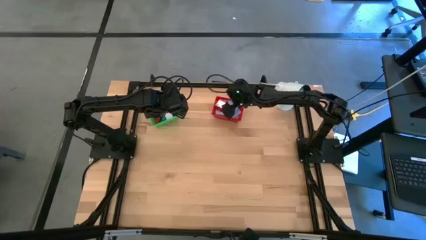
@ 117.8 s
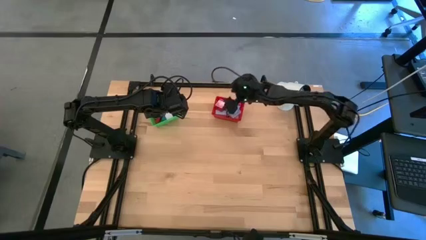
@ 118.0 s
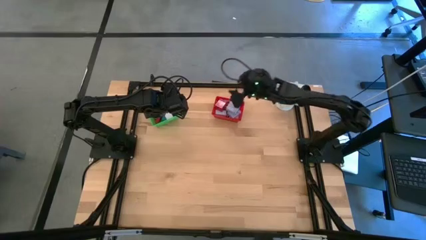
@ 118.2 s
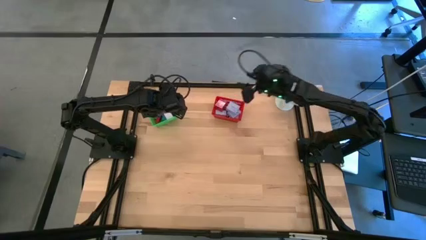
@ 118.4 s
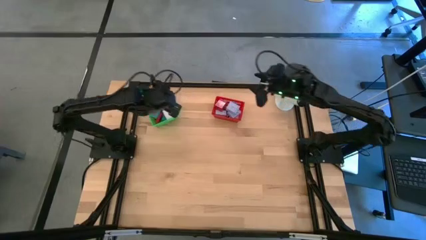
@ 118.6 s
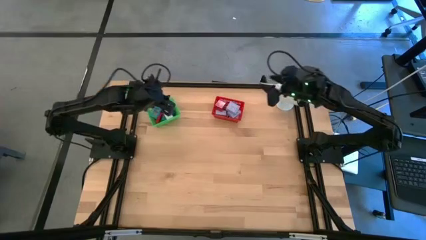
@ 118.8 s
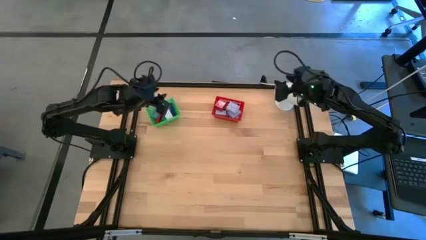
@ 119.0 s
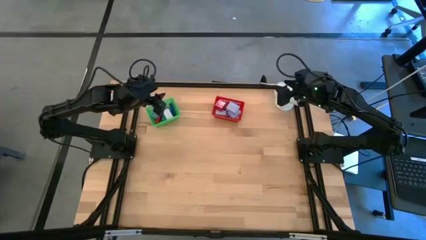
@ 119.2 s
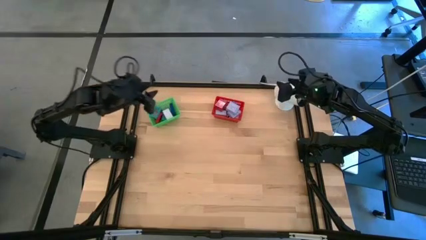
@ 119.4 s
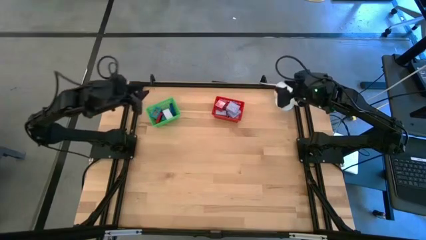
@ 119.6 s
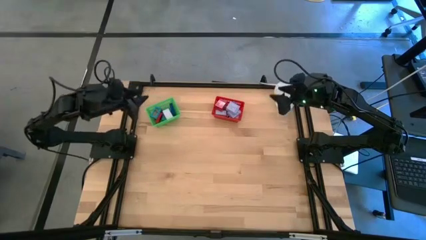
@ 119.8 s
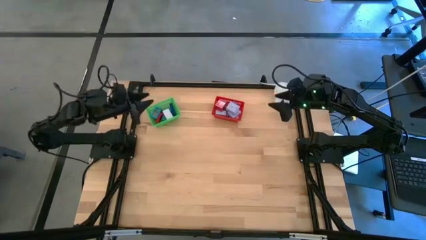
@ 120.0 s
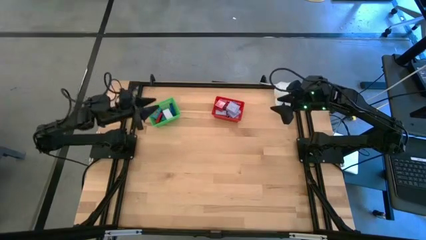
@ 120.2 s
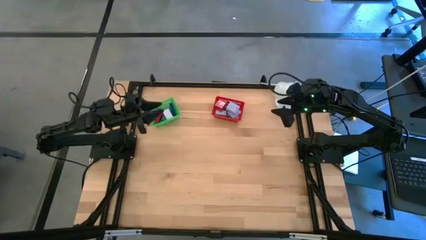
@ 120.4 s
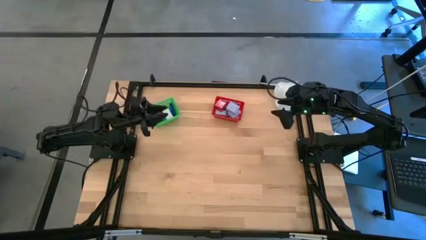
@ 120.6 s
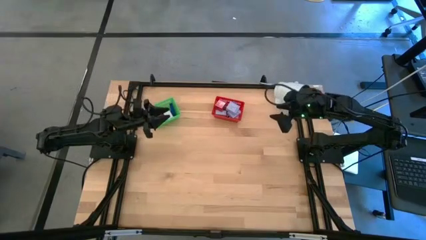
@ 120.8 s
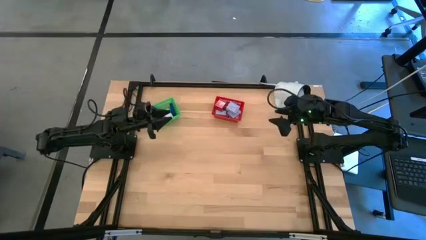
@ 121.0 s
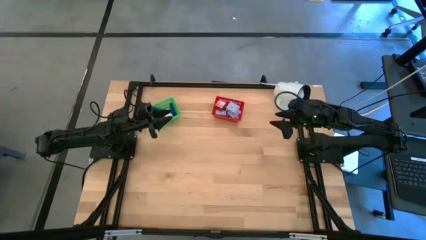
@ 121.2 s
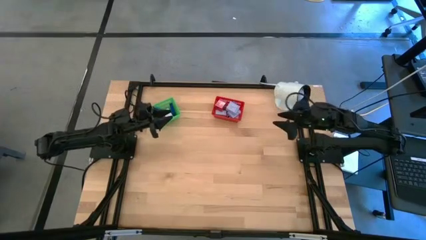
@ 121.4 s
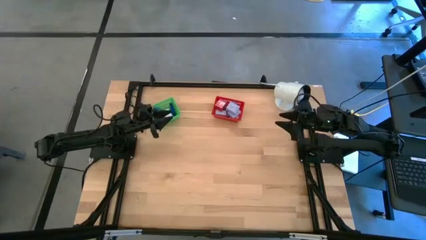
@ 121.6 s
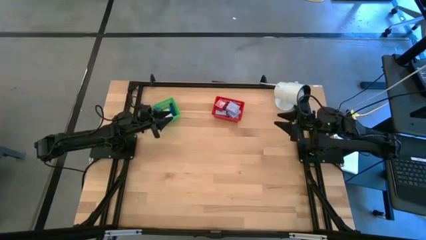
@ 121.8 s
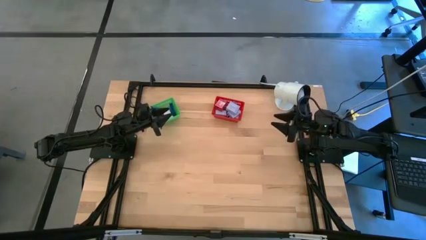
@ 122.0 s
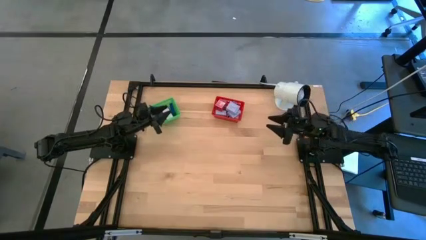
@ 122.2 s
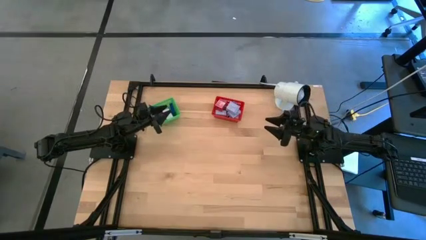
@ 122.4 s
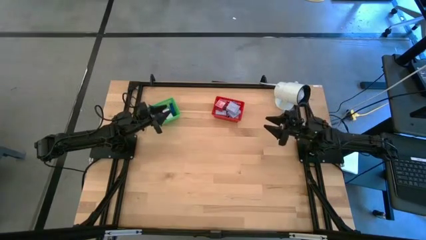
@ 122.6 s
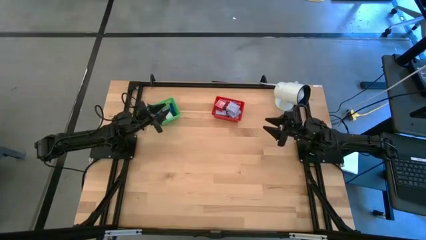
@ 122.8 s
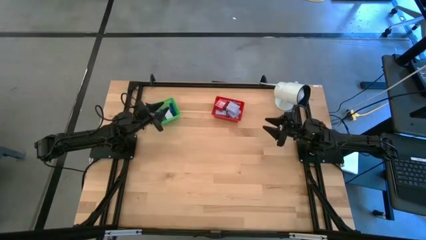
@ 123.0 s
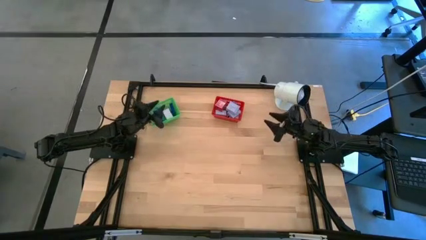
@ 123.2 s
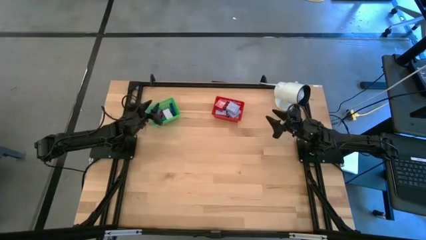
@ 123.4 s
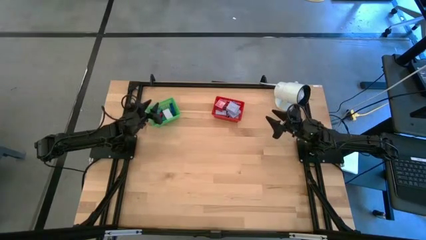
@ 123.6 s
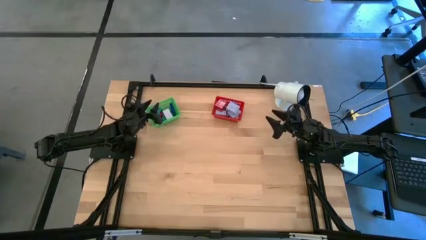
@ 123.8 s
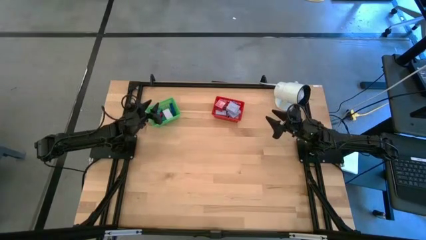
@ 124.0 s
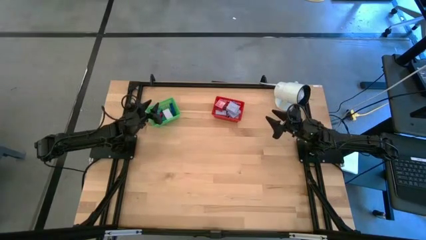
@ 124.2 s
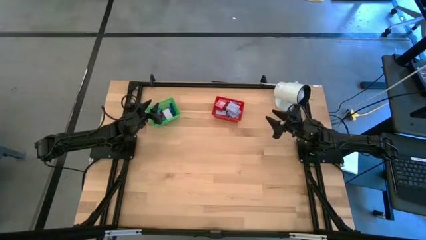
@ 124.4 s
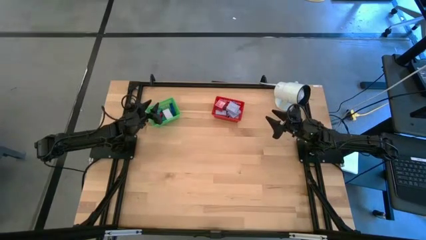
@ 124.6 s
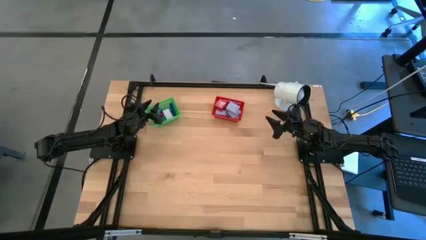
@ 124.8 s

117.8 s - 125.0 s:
Task: Pick & Place Office items
Return to Home Position

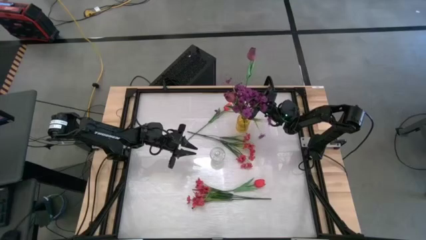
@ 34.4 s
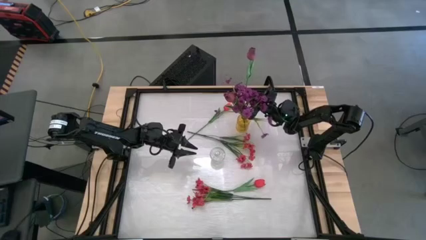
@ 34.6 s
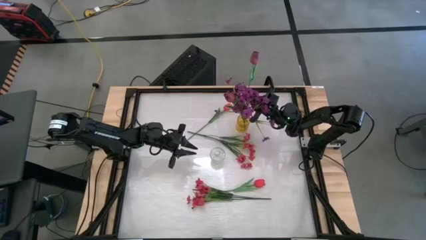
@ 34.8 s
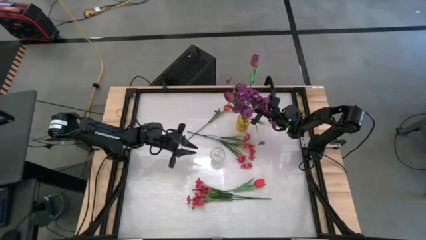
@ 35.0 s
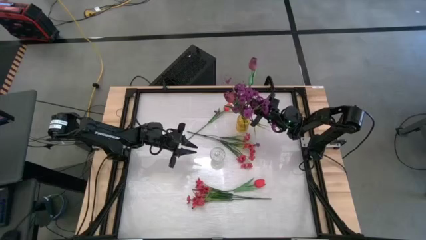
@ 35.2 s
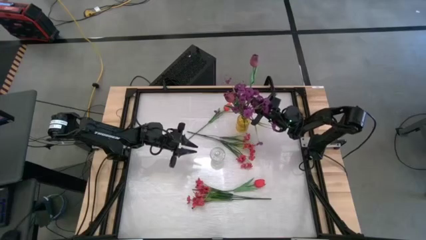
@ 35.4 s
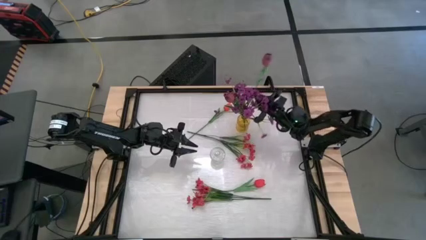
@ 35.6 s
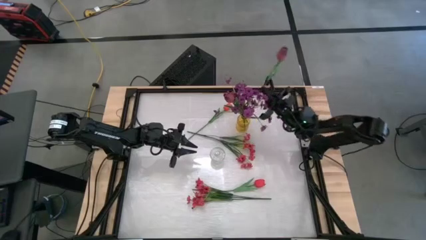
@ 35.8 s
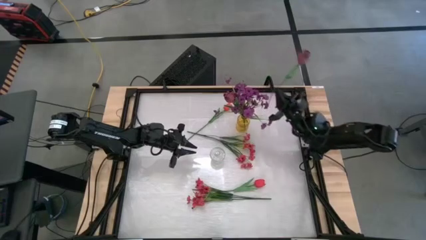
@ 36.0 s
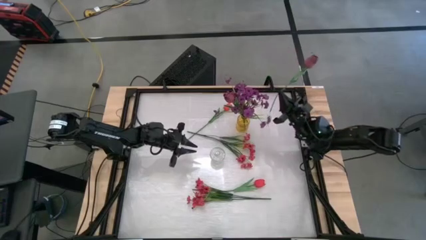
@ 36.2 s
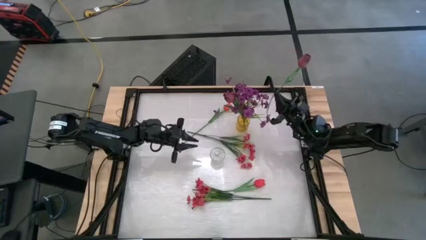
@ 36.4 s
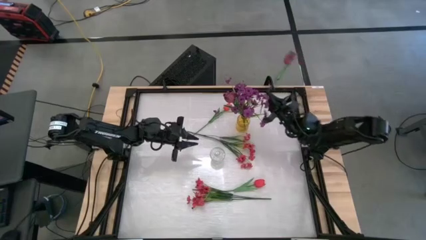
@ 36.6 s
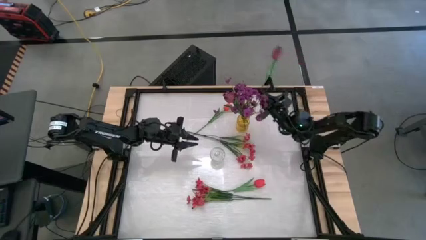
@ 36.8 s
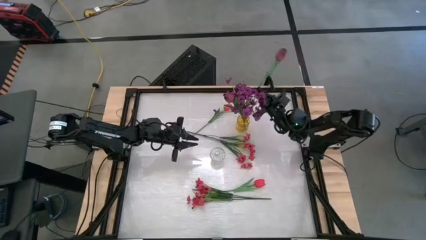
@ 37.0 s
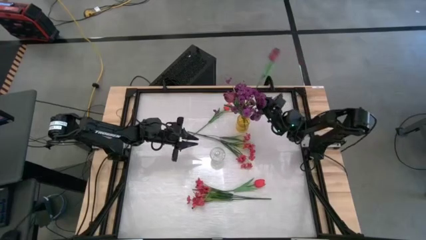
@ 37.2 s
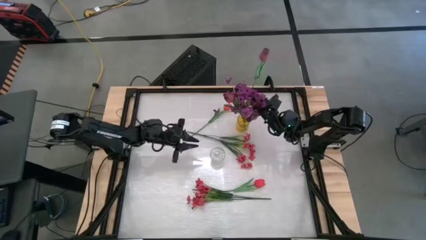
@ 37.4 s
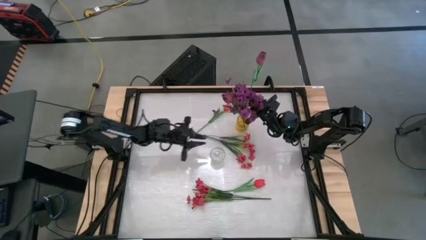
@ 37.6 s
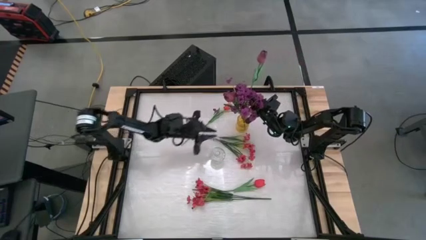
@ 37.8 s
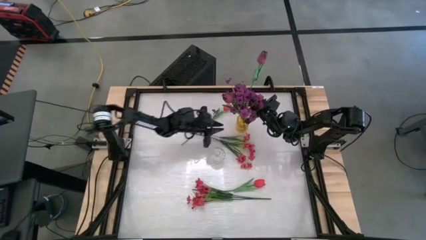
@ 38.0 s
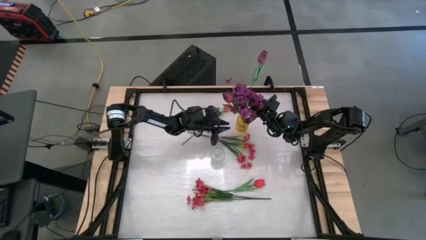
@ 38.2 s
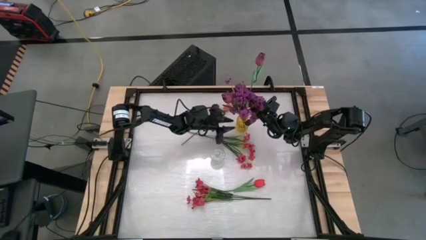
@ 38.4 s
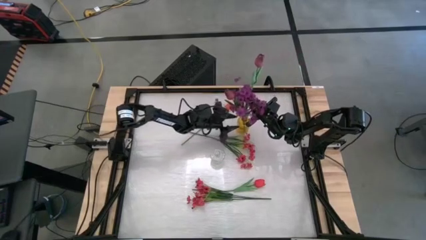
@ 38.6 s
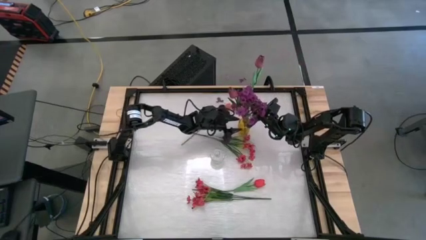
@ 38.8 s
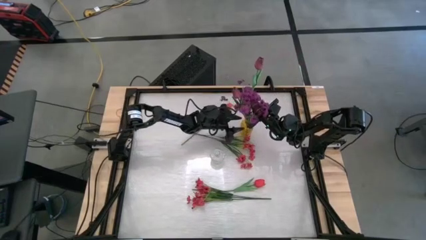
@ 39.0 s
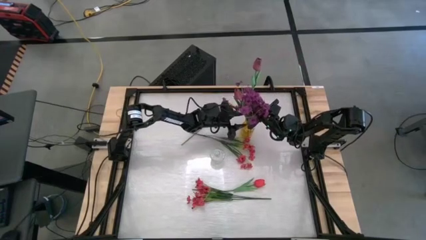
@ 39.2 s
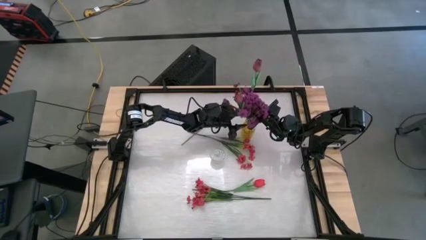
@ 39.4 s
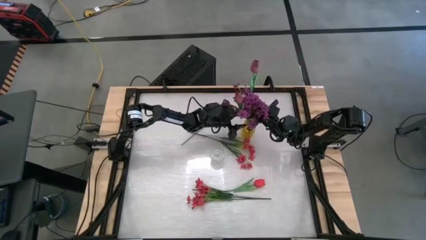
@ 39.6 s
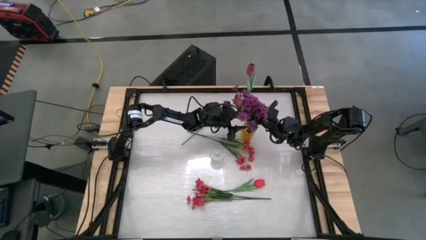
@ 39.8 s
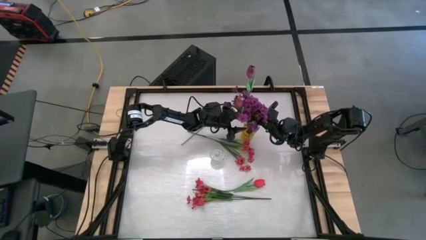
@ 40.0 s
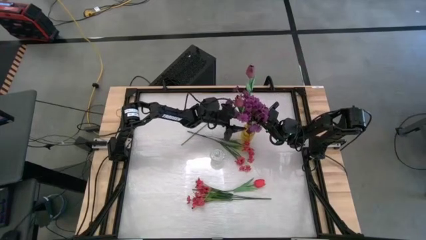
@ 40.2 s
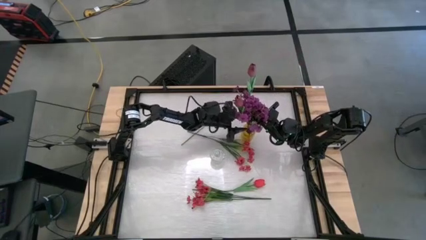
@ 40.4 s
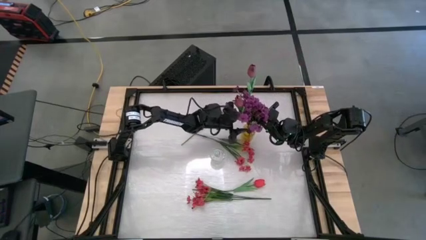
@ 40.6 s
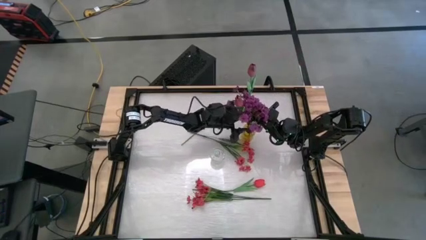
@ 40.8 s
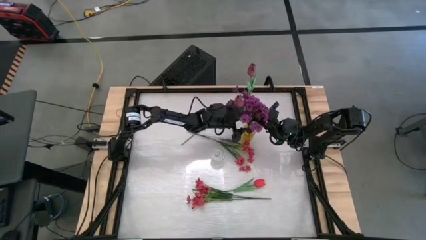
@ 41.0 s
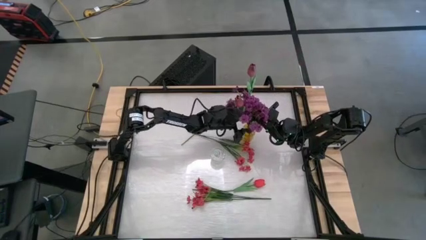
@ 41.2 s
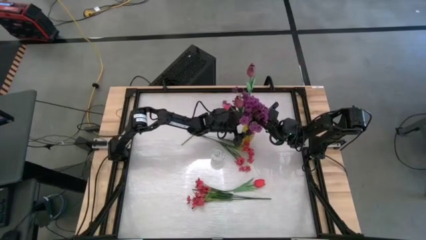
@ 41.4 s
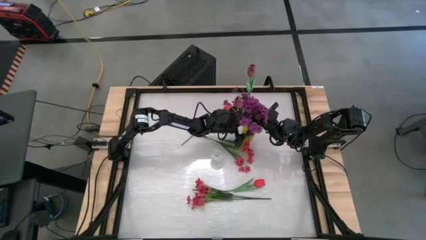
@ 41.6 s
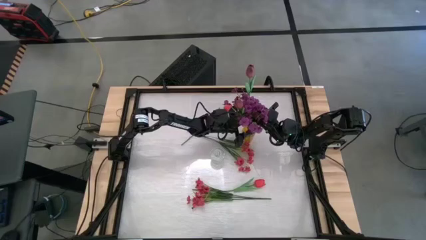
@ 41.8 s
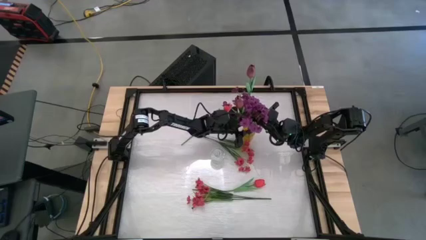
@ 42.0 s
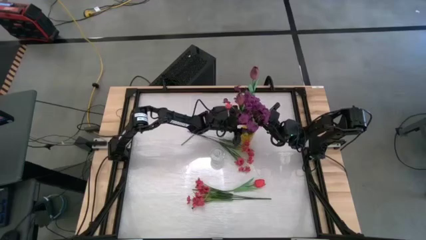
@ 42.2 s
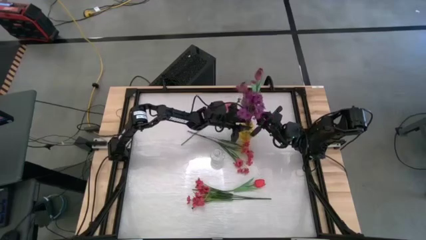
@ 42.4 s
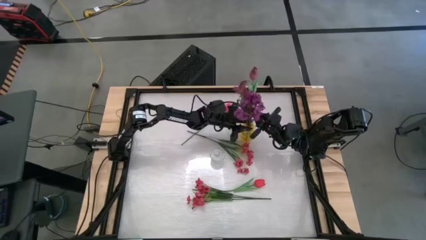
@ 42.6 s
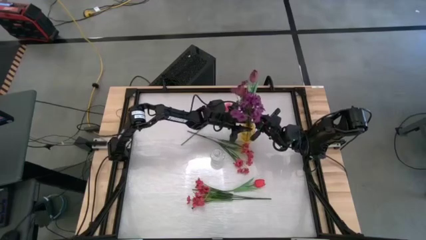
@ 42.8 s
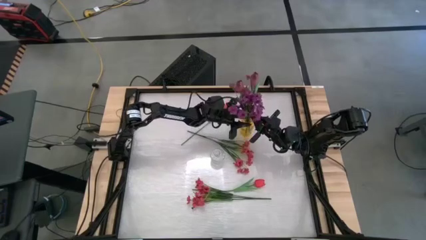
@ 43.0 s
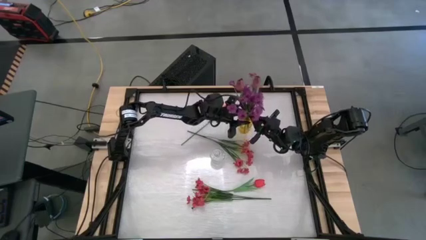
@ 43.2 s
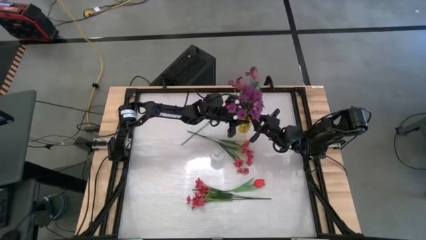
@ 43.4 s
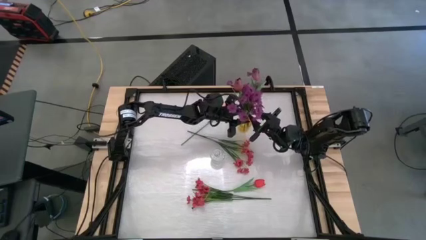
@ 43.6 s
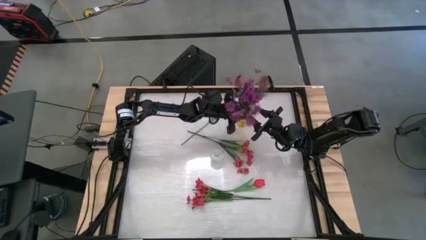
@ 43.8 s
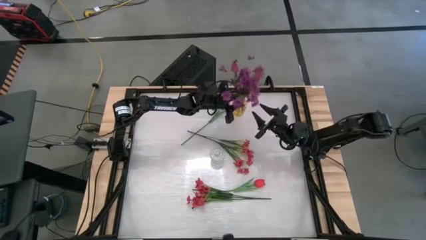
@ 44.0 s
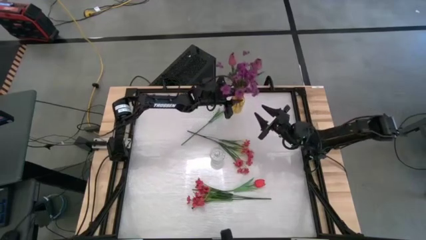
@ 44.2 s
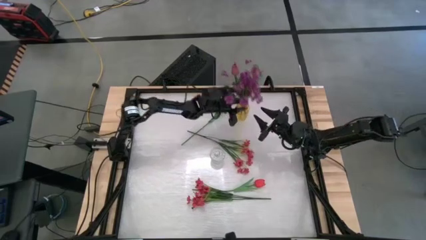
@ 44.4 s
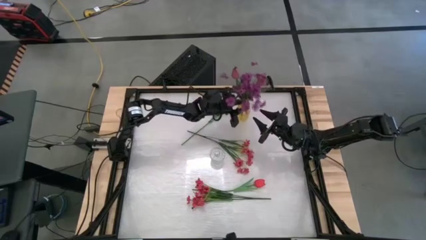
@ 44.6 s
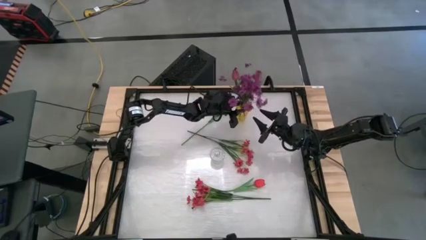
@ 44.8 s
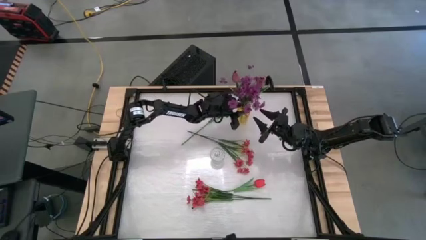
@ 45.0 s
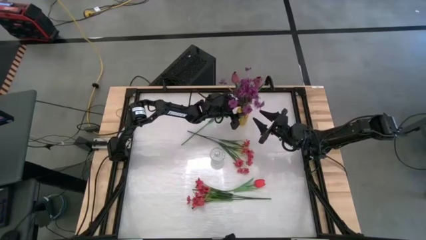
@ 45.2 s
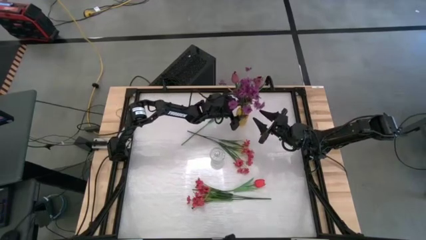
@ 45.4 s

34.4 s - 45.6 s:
Task: Sort flowers into vase by color
Put the purple flower into the yellow vase
